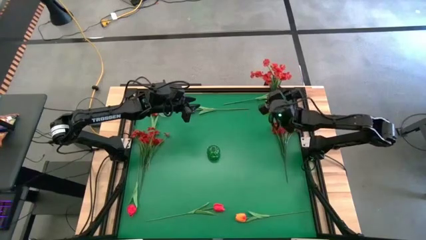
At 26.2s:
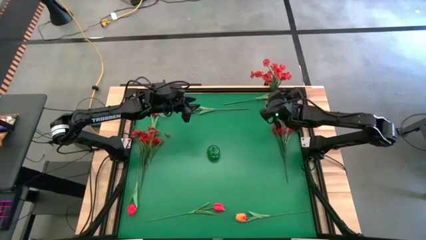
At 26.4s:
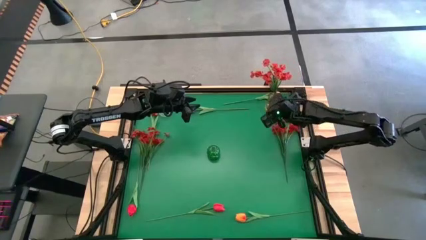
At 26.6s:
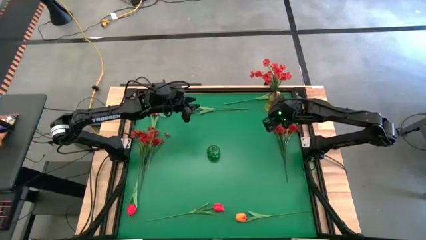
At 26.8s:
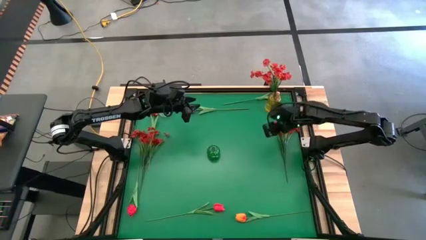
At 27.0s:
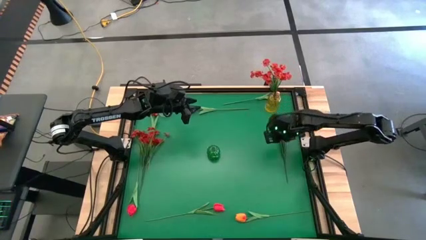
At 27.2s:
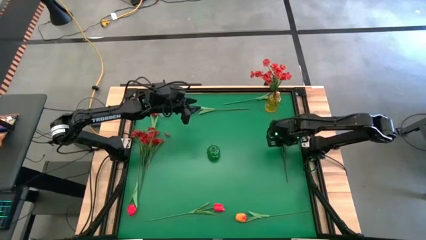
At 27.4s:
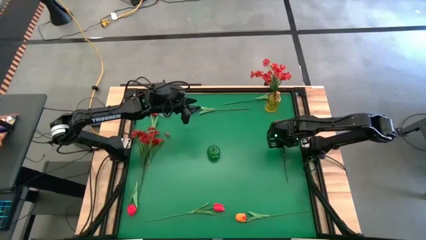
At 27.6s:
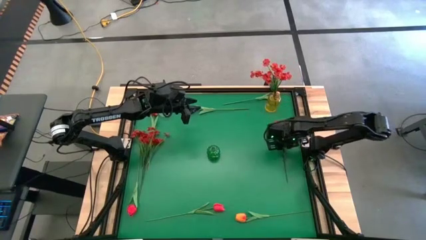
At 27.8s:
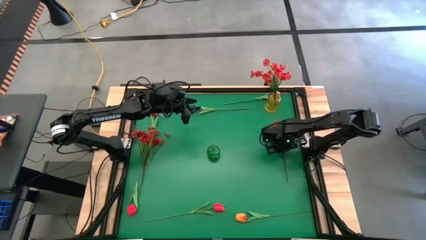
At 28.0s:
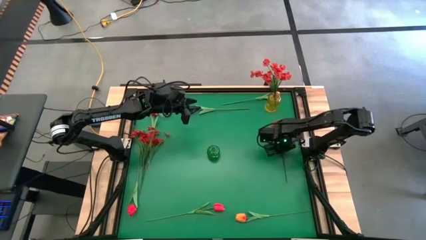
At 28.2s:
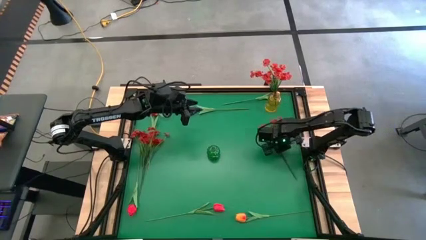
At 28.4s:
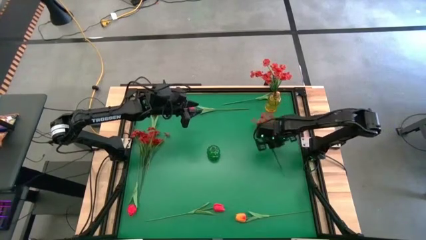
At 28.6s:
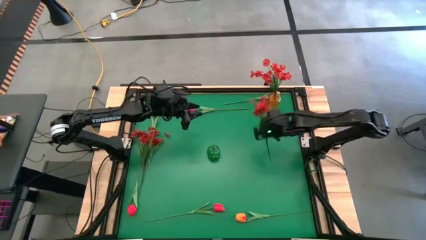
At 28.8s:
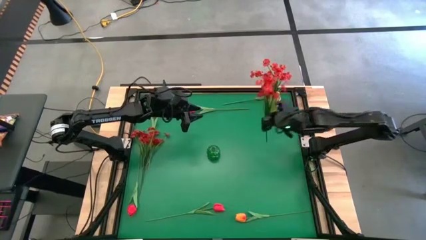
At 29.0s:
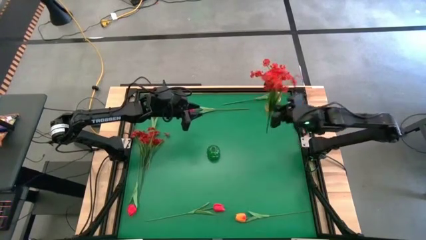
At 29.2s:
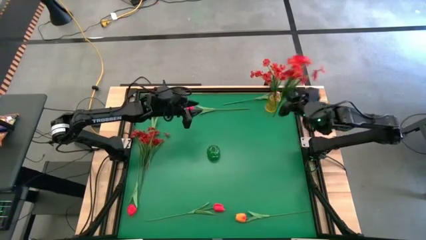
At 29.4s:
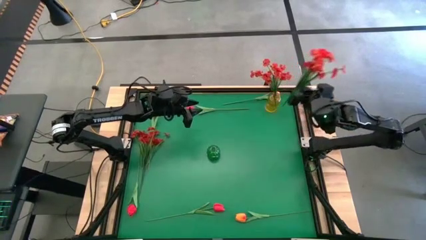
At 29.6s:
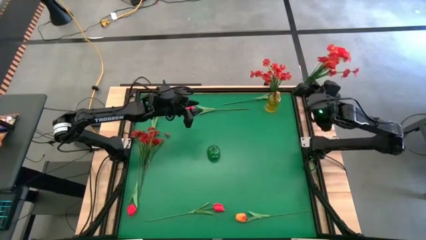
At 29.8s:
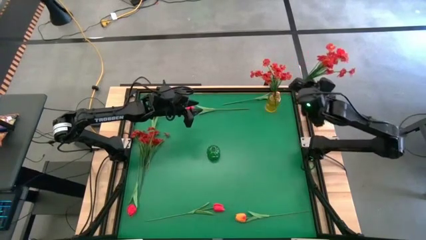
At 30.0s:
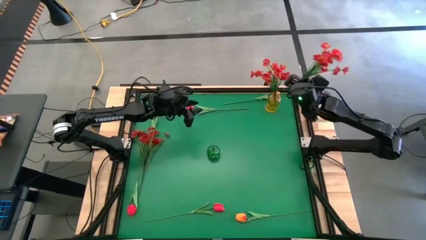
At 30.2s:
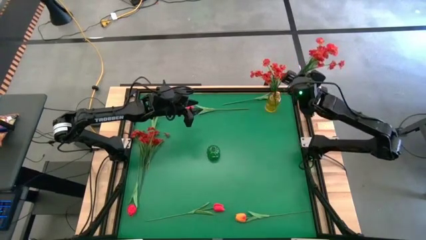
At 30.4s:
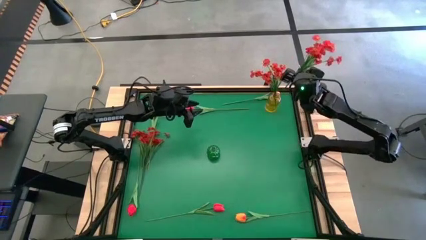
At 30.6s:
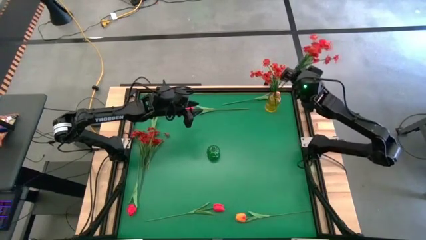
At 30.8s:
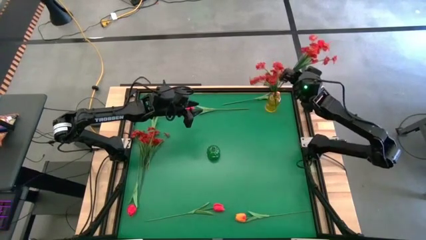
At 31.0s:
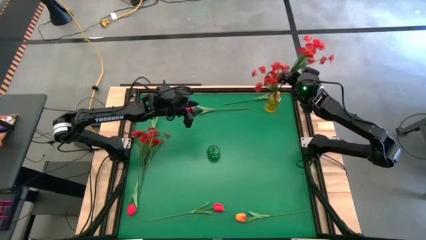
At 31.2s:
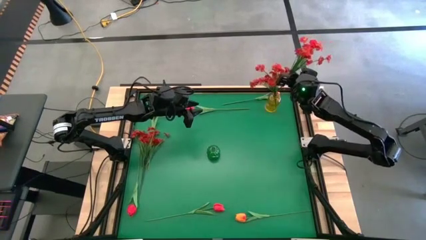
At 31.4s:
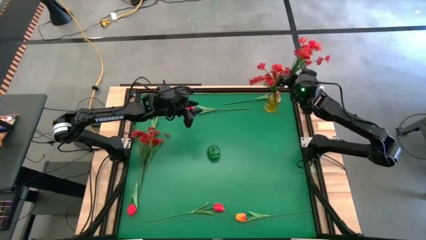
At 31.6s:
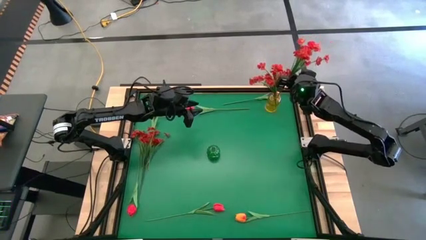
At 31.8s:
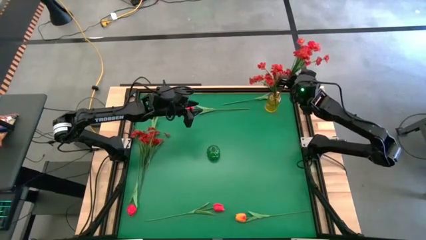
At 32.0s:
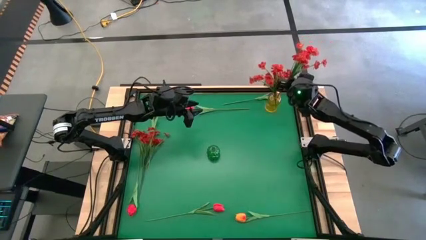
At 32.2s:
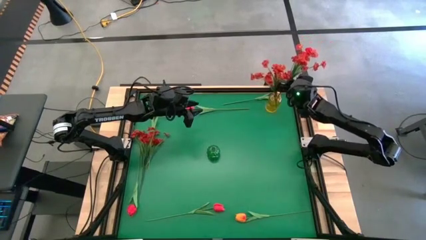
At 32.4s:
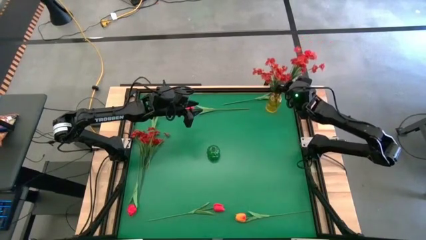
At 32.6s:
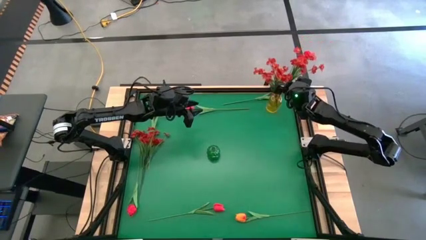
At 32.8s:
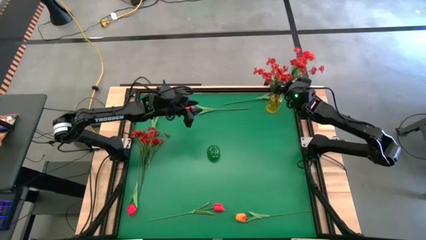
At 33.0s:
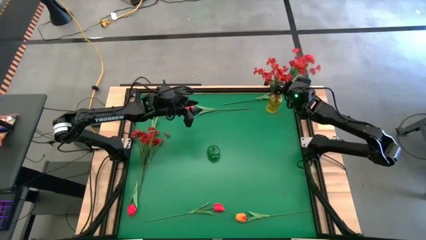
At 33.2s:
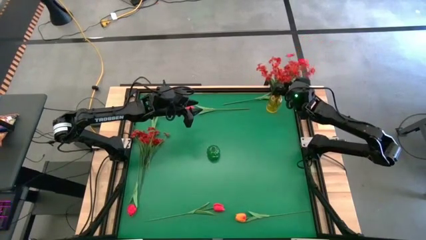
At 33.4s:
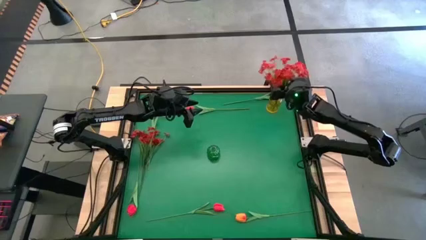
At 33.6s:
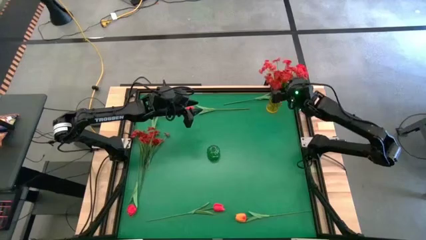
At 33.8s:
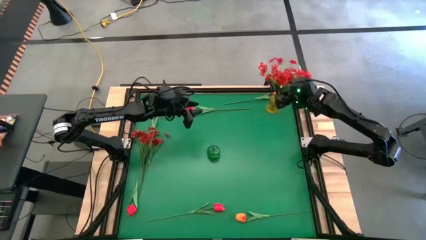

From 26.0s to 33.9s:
Task: Sort flowers into vase by color
Put the right red flowers into the yellow vase

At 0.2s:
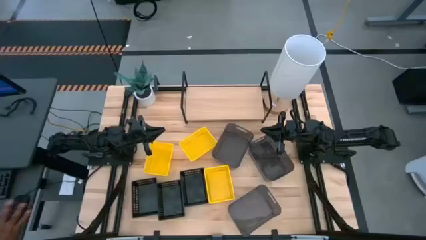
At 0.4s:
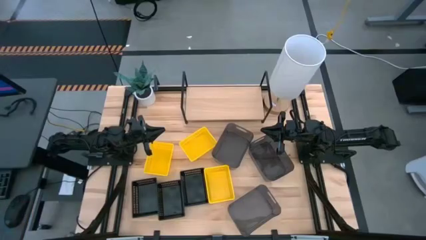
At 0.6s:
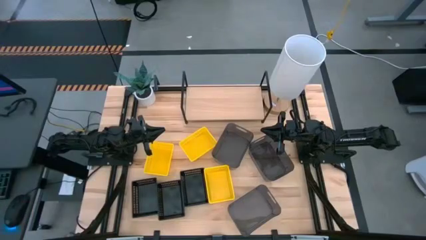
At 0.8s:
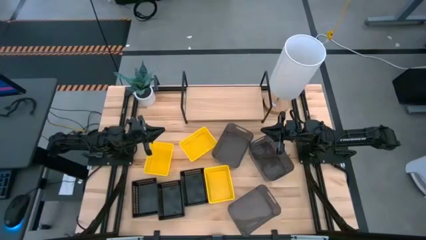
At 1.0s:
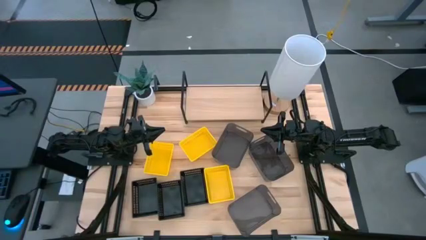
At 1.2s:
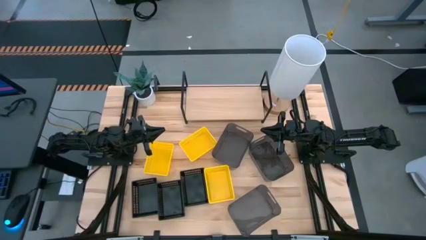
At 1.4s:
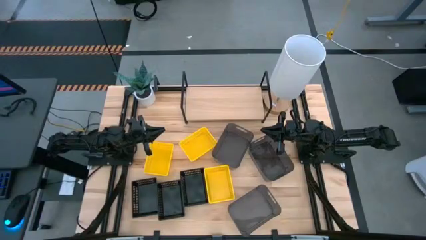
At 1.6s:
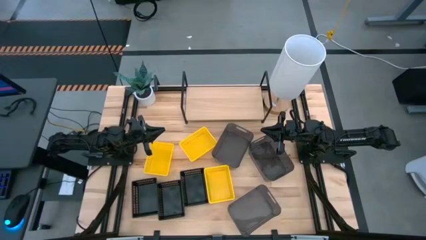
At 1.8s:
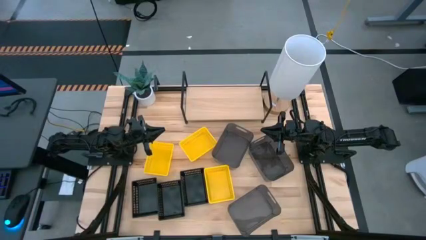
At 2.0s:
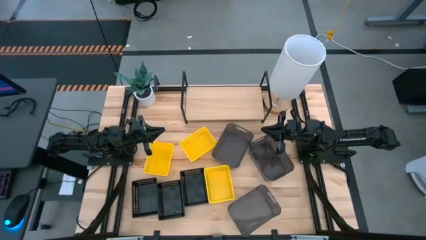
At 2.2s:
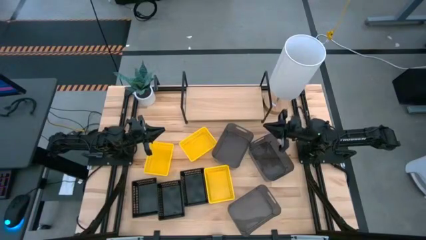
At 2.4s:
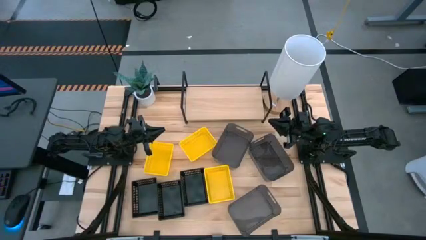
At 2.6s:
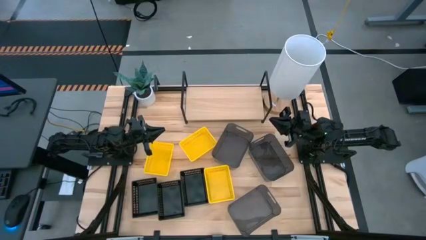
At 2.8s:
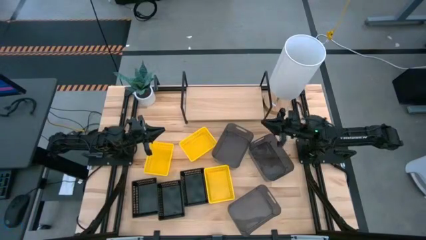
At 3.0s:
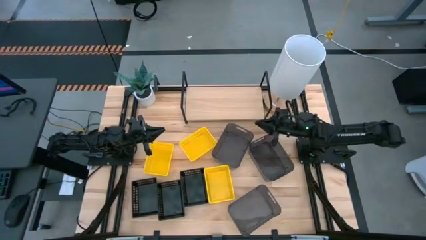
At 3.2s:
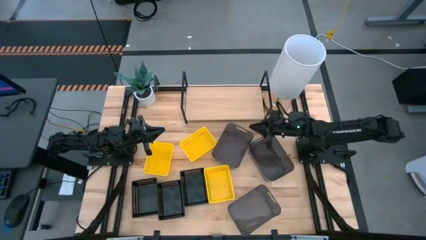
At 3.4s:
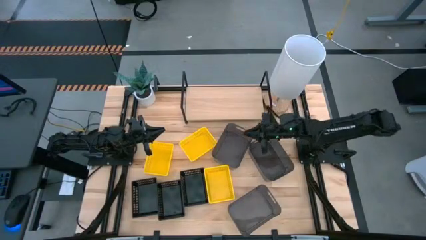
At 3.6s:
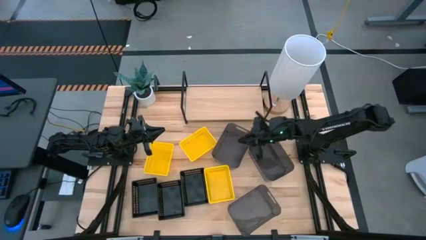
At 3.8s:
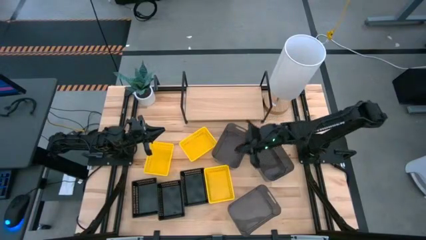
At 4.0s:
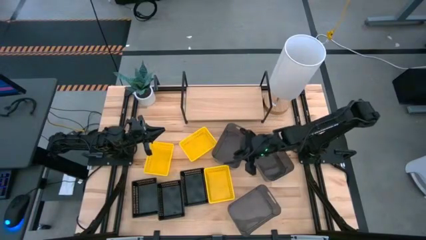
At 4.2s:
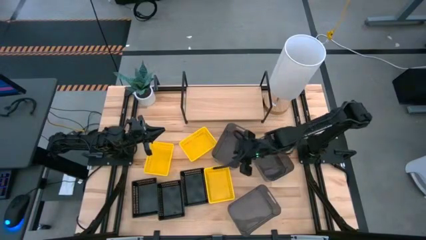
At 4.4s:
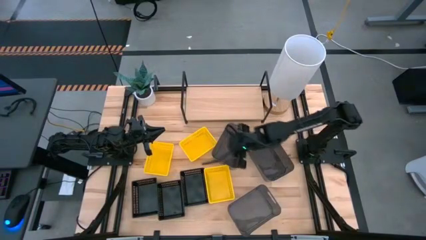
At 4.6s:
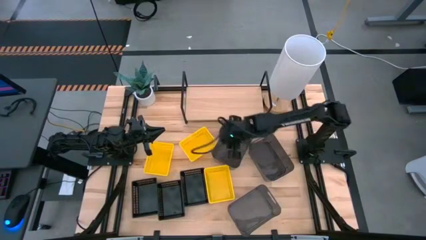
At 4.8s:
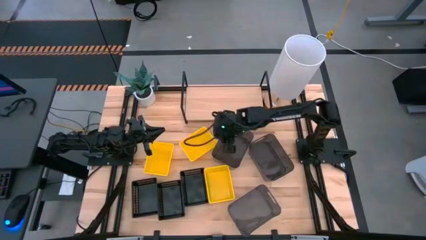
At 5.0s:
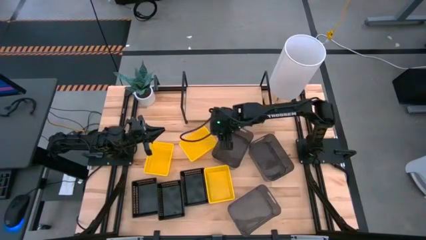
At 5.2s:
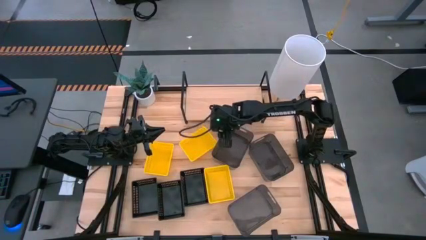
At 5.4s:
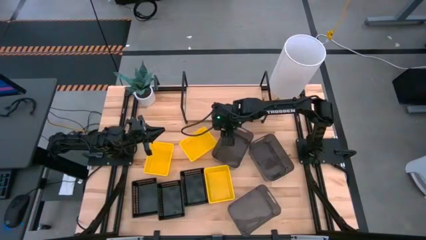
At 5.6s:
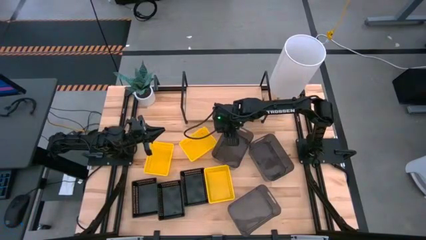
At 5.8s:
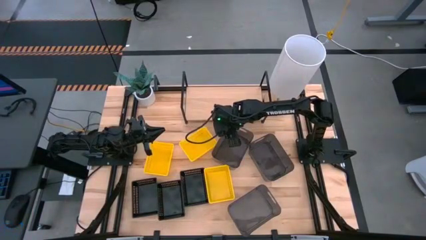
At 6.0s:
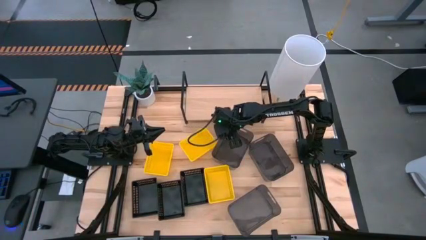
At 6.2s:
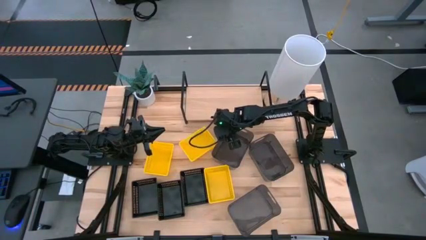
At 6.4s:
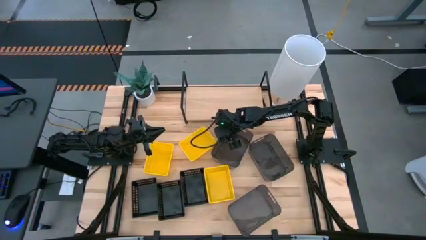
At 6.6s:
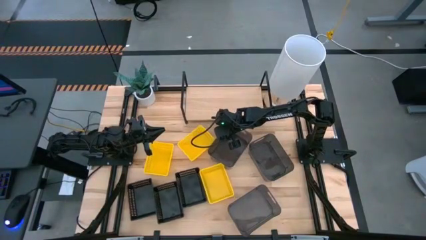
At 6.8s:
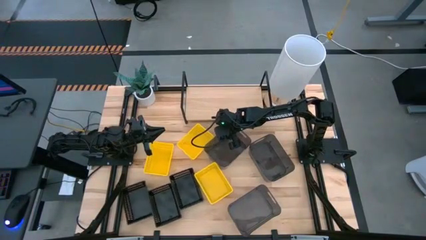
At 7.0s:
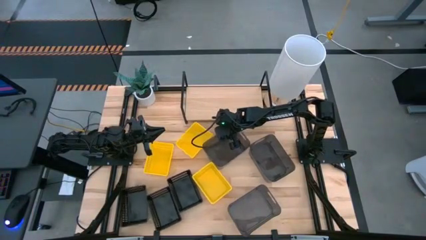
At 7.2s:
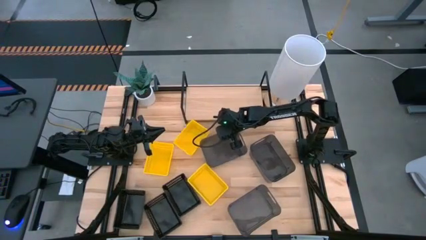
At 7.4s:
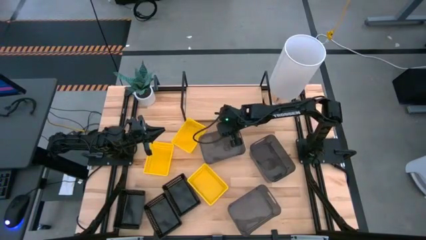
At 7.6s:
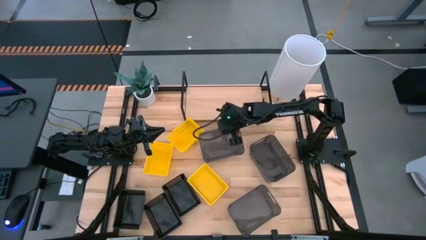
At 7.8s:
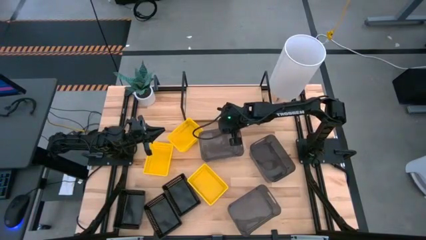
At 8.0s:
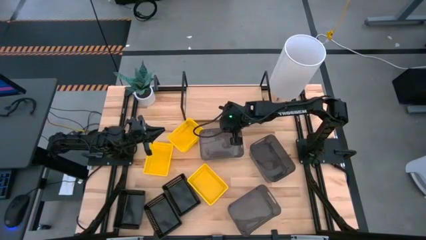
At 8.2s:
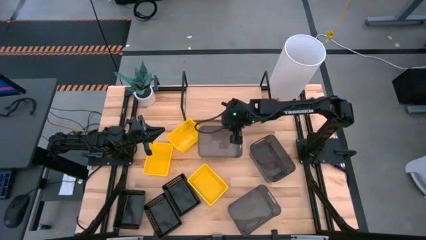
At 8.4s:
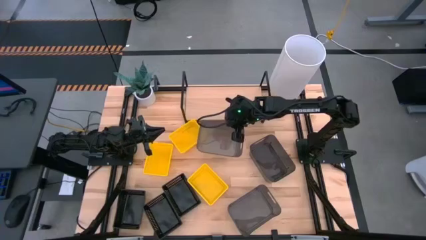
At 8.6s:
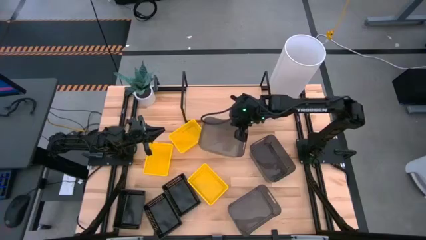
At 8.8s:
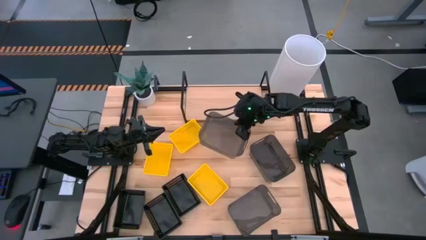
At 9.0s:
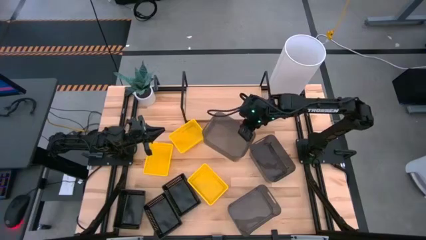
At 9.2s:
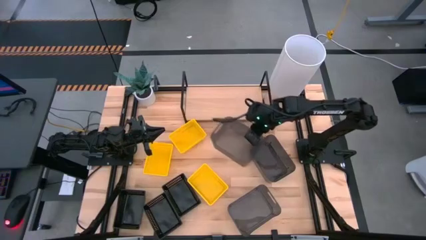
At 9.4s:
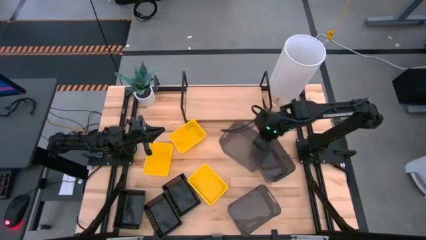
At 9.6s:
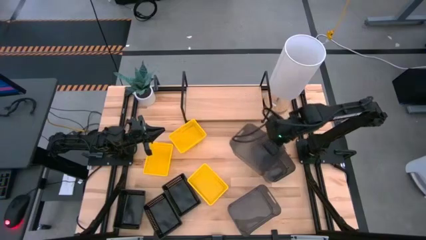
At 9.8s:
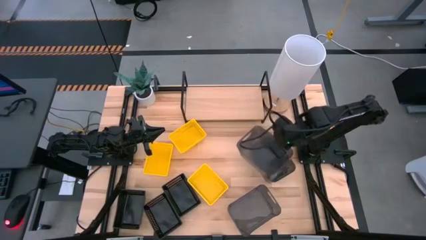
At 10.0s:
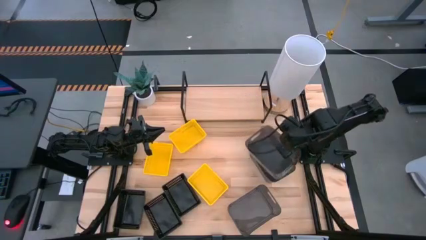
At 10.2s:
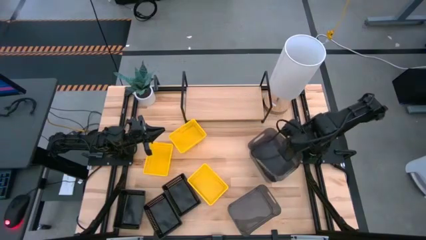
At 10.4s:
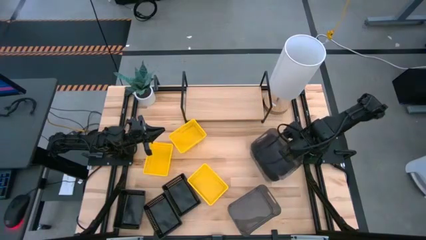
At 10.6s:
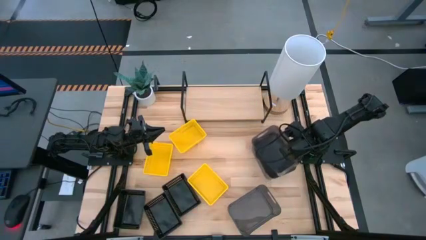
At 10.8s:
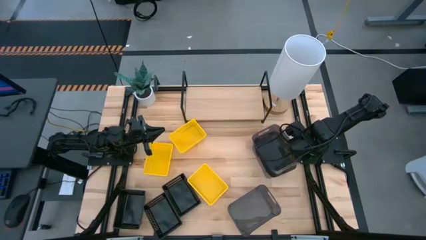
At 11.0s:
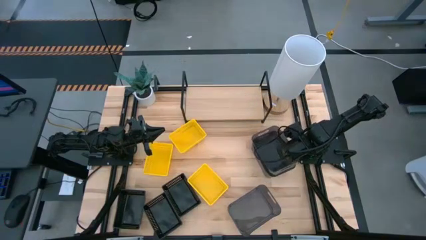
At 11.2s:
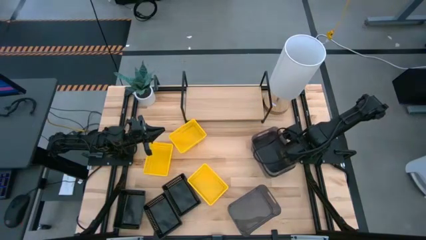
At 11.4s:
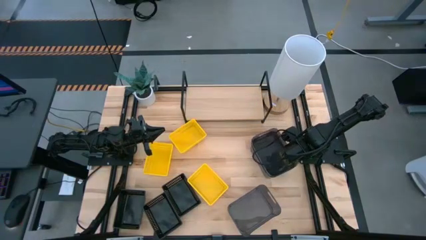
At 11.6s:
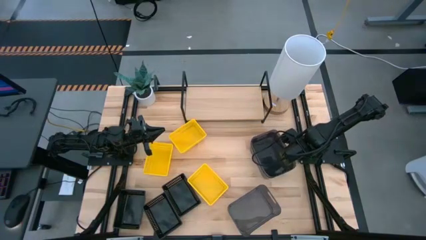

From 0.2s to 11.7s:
Task: Stack baskets on shelf by color
Stack the transparent black bin on the transparent black bin
